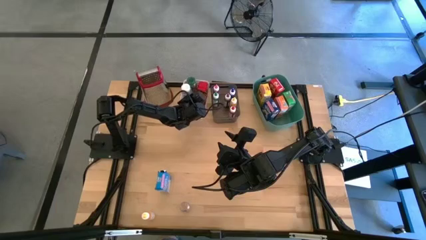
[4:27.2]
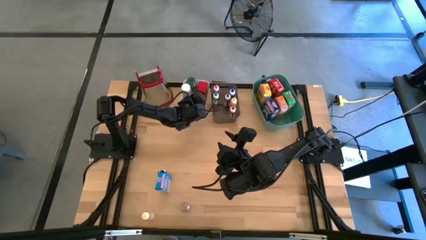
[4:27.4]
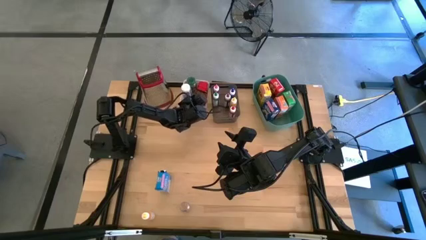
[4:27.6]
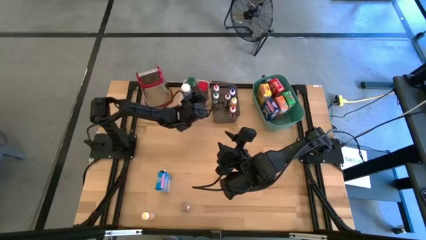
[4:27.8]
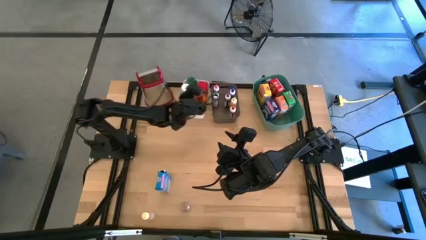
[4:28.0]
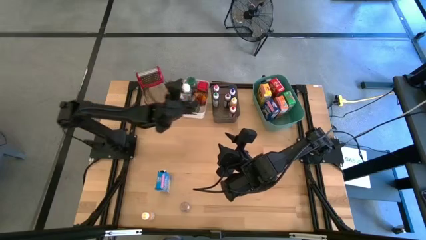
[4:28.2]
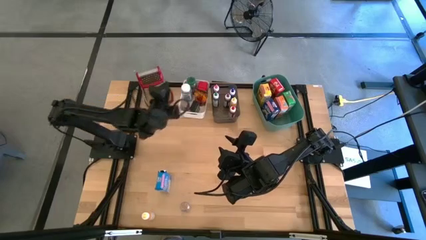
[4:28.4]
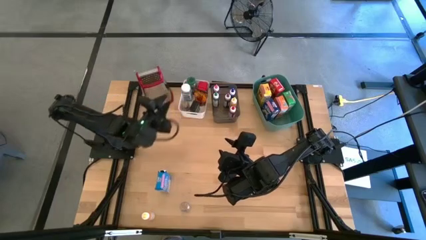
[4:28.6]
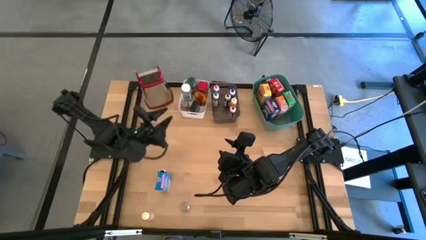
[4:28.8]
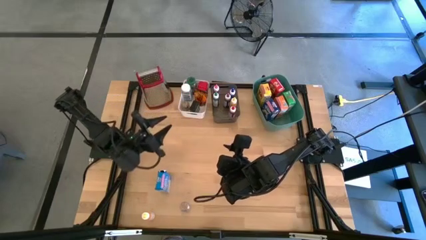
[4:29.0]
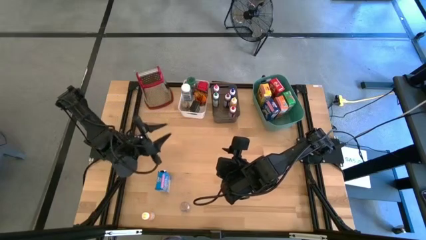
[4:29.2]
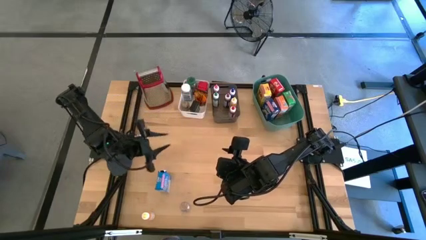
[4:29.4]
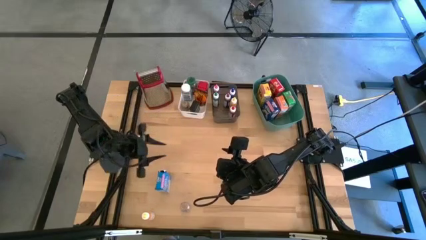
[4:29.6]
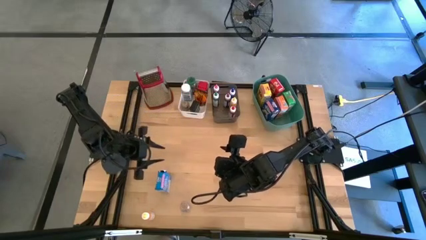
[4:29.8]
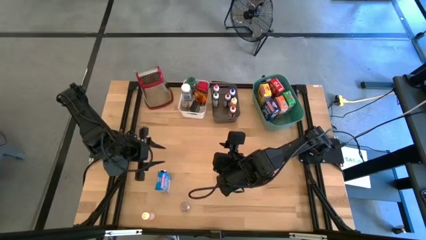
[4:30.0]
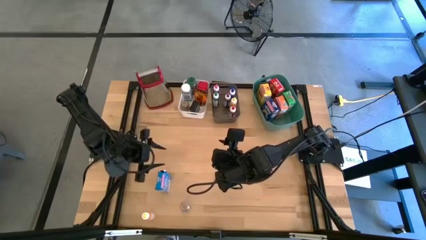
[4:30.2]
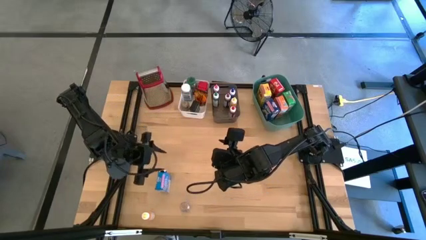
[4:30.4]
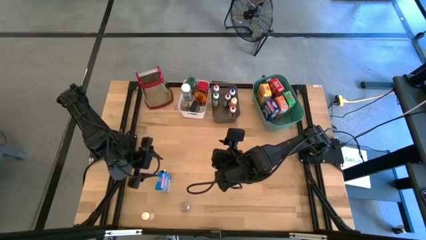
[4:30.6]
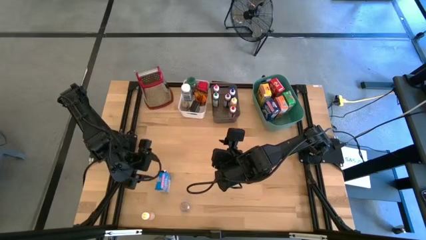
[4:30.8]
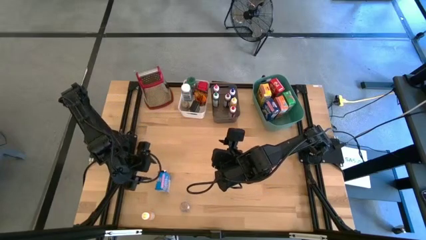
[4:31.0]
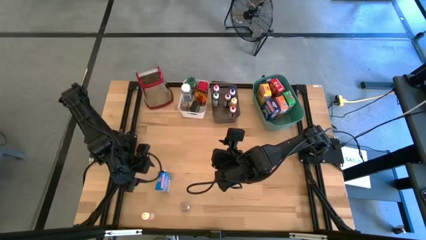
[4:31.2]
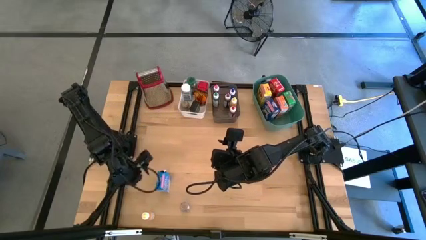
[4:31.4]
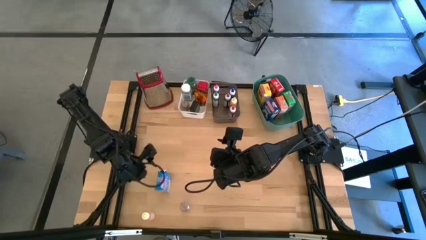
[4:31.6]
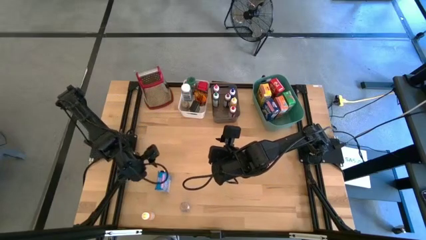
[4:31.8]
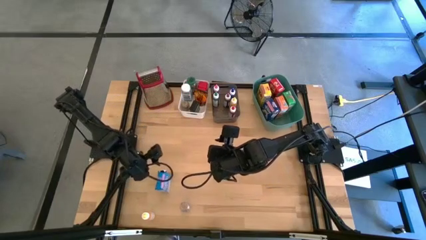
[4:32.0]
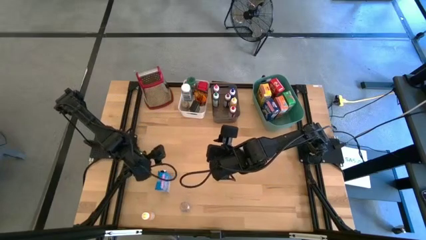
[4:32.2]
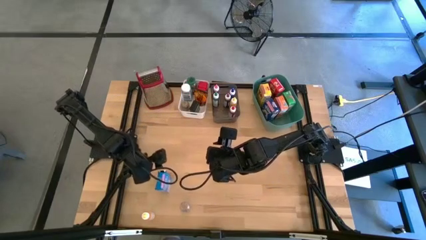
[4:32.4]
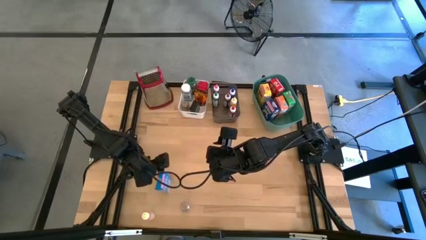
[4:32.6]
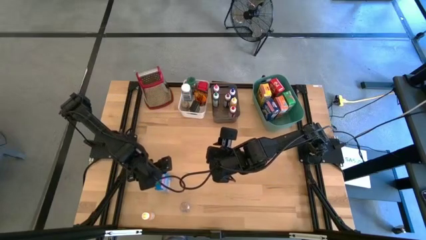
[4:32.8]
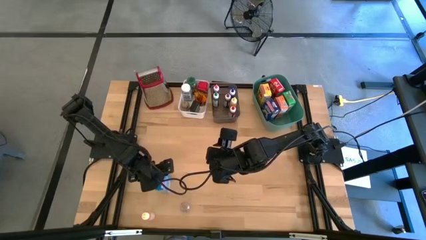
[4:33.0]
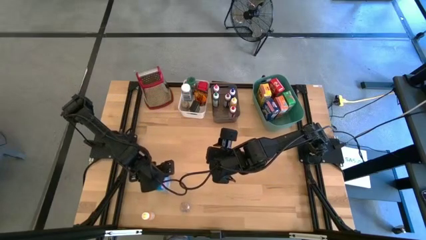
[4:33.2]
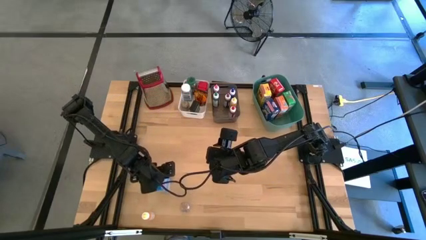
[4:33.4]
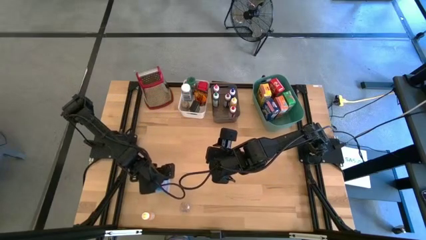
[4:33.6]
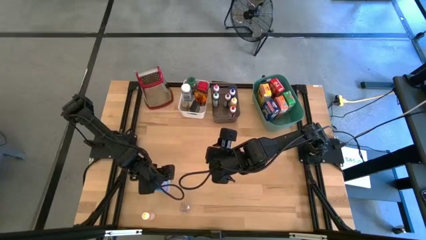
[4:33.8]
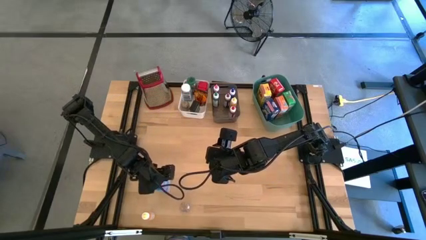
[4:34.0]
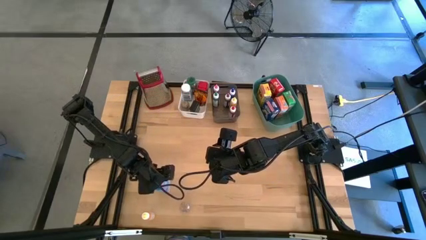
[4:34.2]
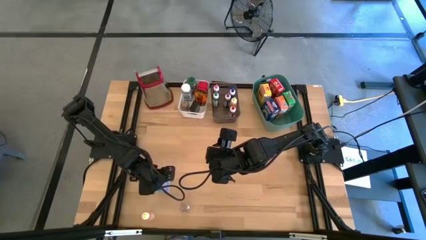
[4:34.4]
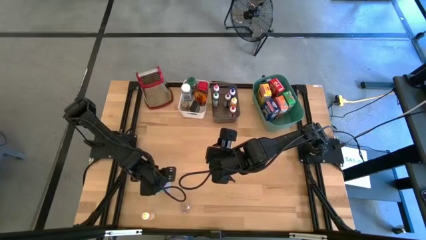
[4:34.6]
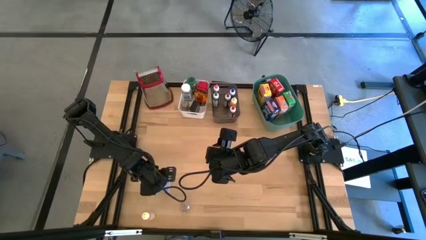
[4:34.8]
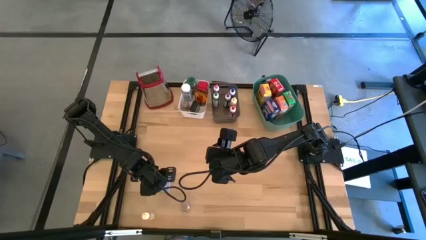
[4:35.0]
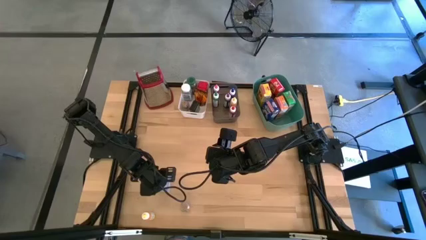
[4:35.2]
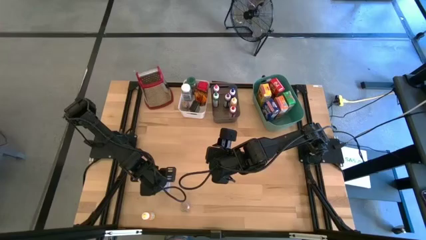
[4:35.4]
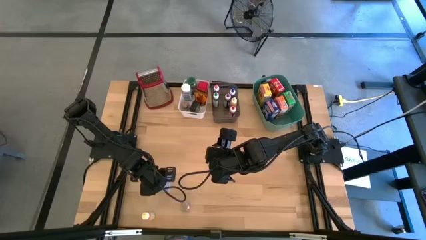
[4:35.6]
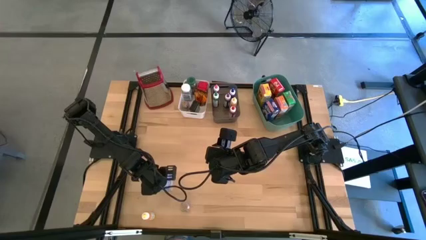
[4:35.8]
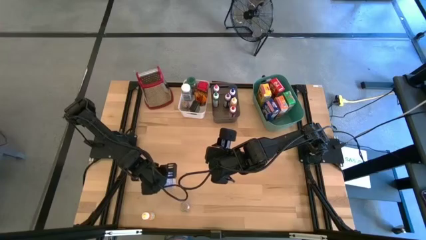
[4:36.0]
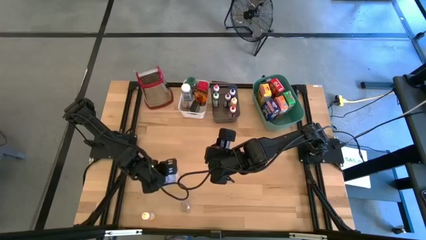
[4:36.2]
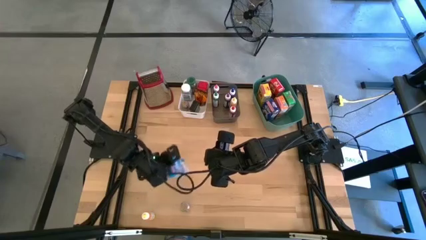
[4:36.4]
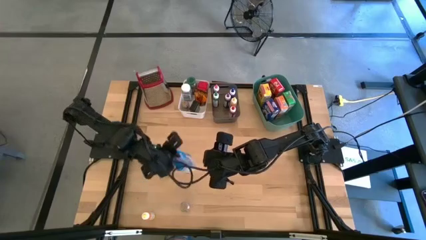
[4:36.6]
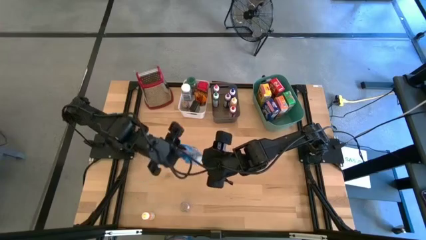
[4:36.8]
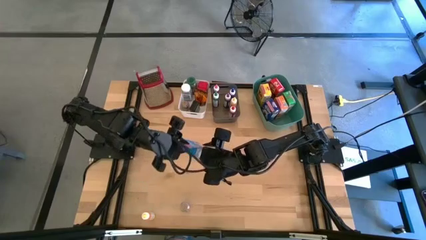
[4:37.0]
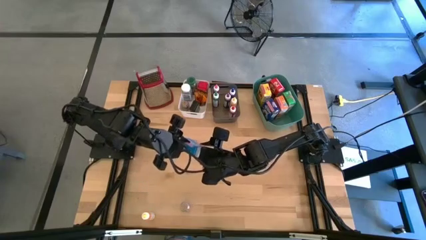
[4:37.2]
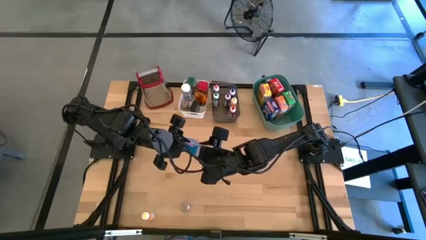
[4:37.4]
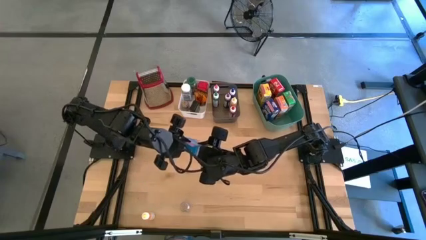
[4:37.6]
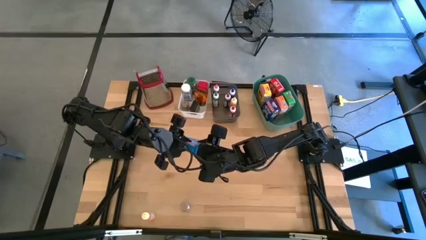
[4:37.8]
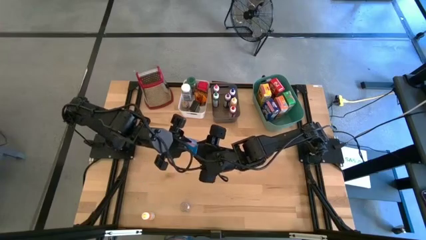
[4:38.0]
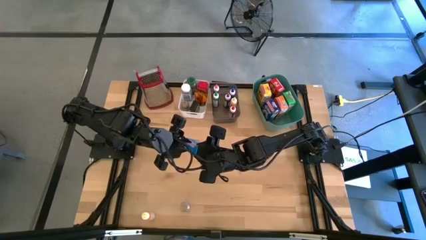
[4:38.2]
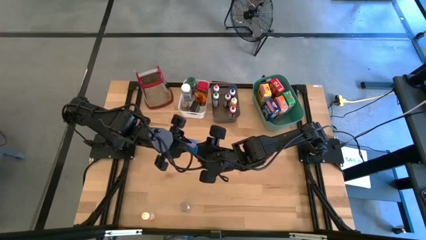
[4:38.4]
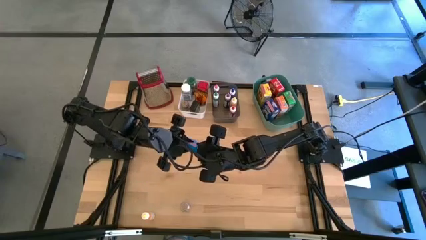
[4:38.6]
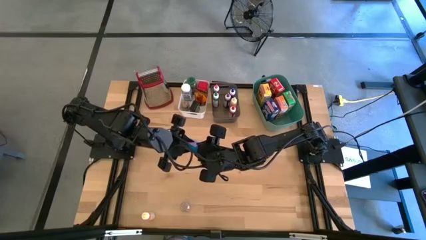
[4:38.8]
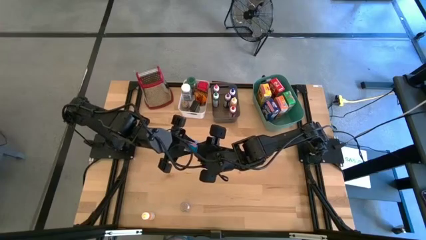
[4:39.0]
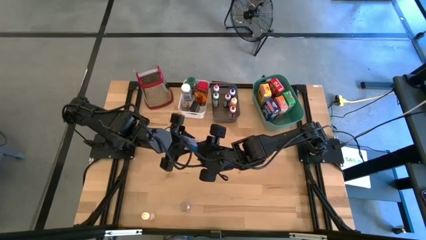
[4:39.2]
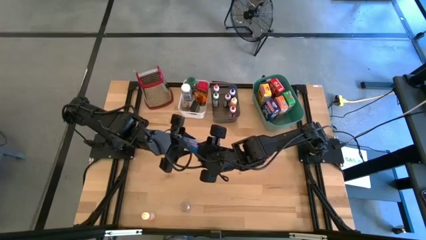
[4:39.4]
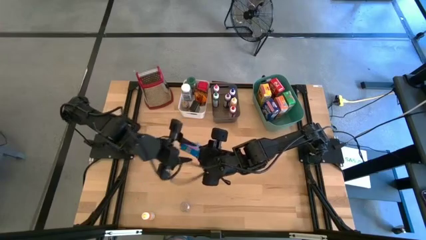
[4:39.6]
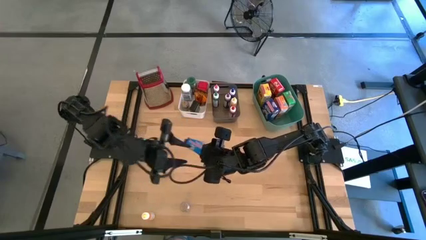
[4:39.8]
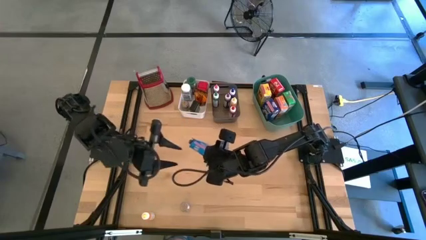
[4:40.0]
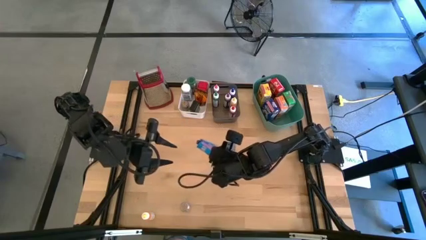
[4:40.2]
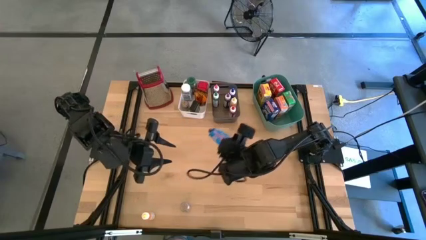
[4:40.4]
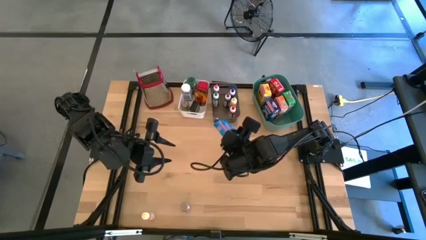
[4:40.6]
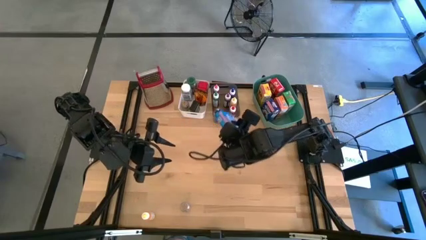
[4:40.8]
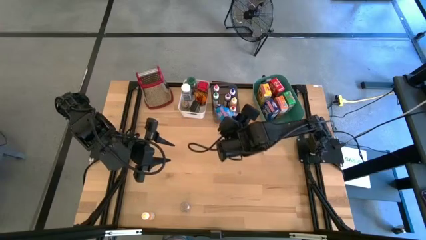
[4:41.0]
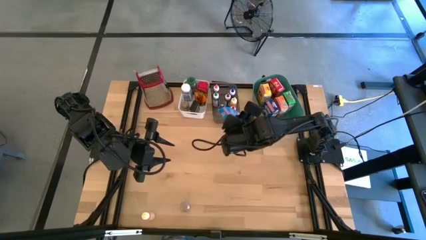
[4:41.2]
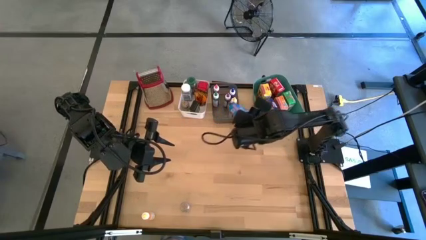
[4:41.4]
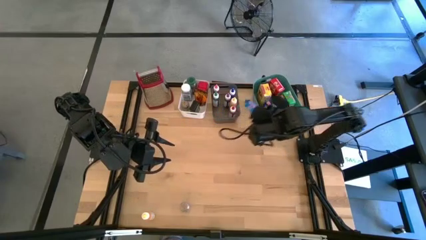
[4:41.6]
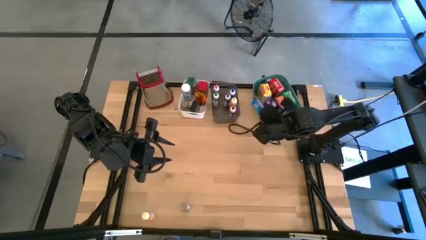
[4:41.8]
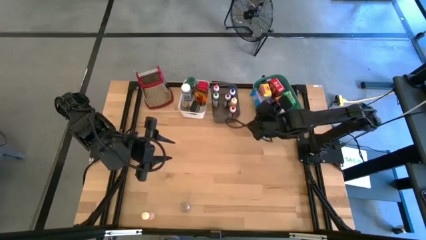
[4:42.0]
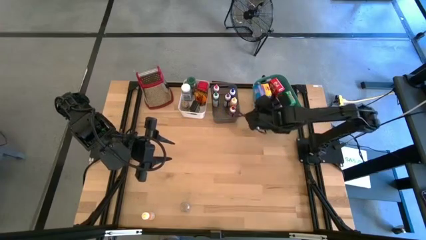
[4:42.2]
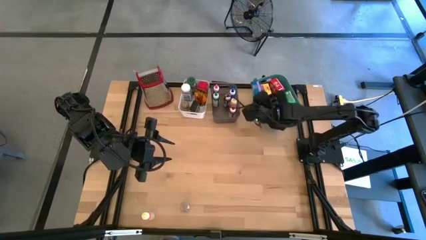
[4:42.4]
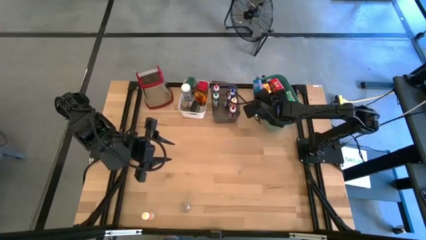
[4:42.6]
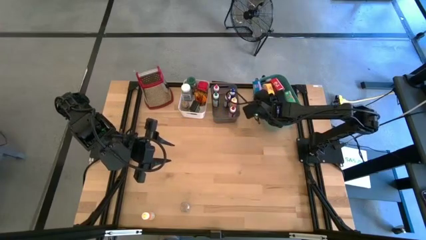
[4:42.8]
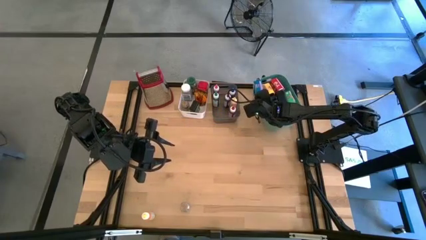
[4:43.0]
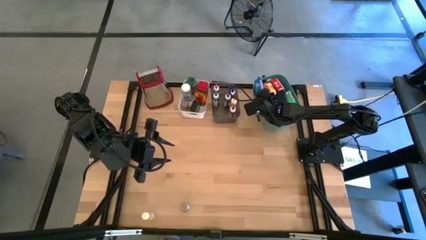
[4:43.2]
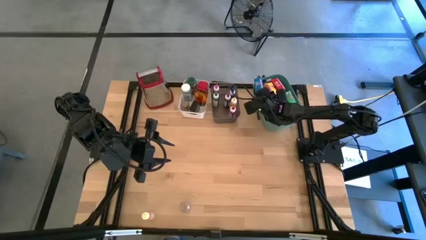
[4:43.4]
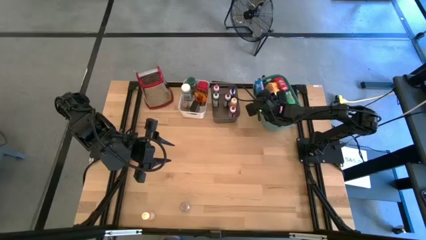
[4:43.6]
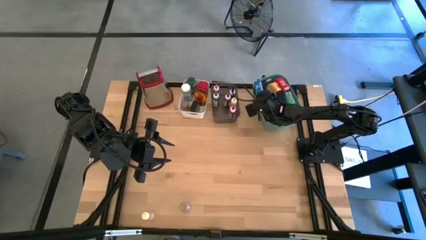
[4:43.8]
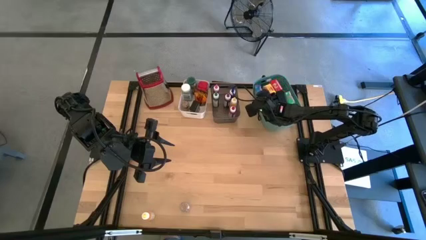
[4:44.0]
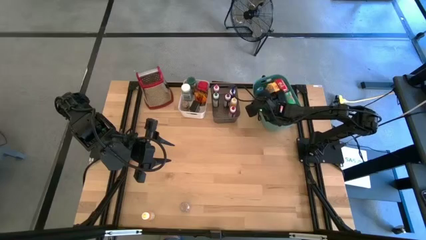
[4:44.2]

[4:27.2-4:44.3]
Task: Pick & Place Kitchen Items
Put the light blue cereal box into the green bin
